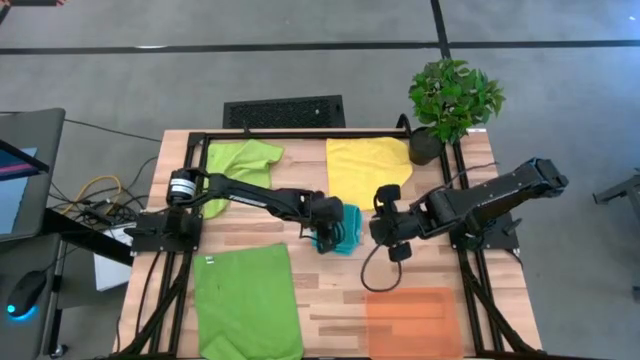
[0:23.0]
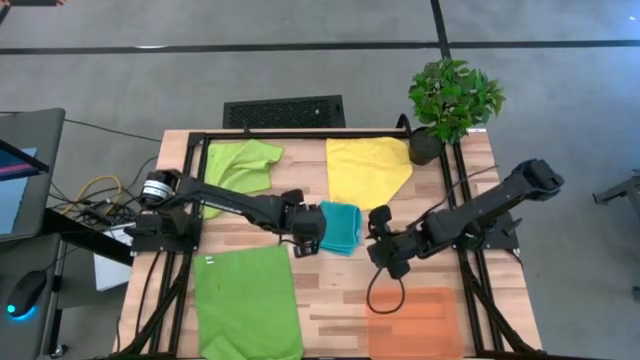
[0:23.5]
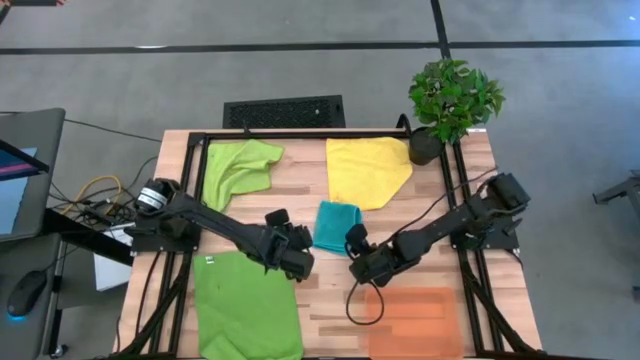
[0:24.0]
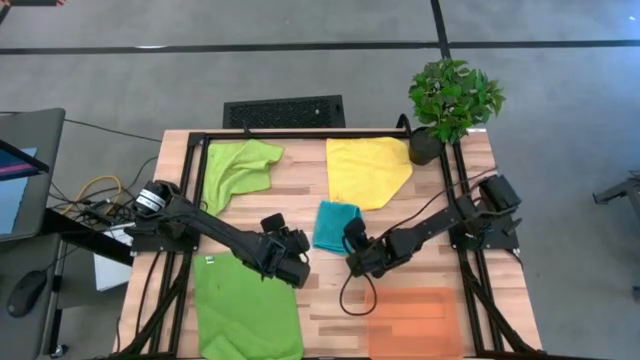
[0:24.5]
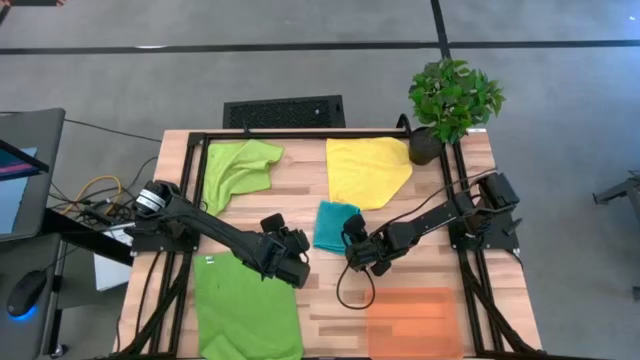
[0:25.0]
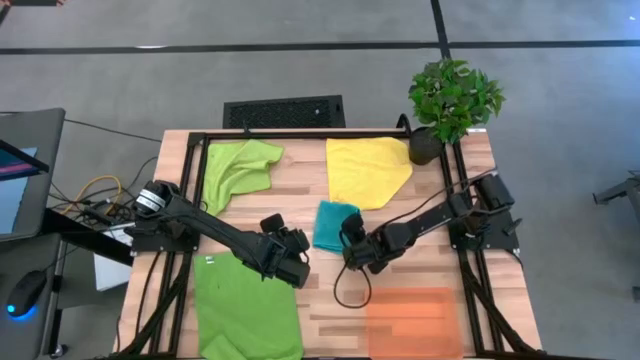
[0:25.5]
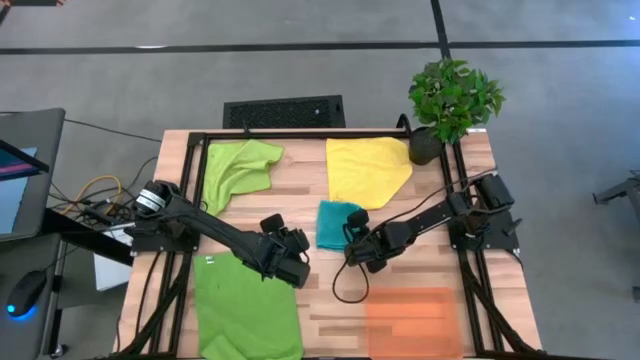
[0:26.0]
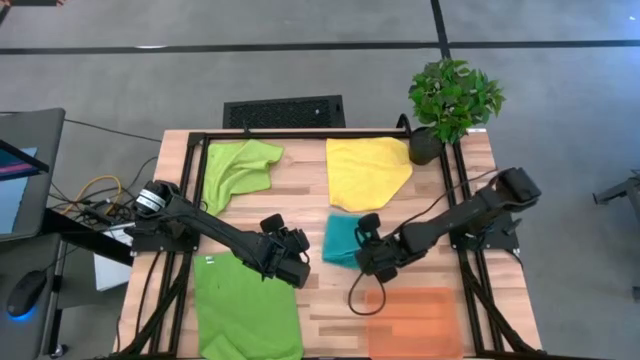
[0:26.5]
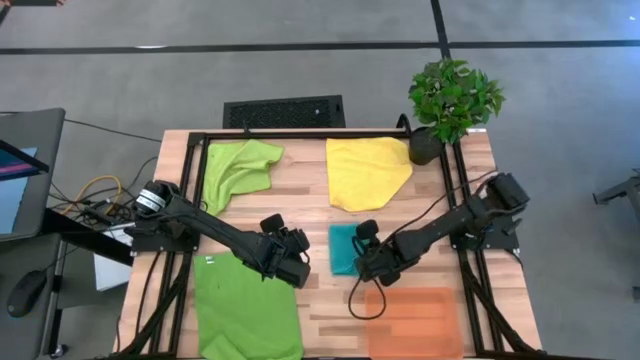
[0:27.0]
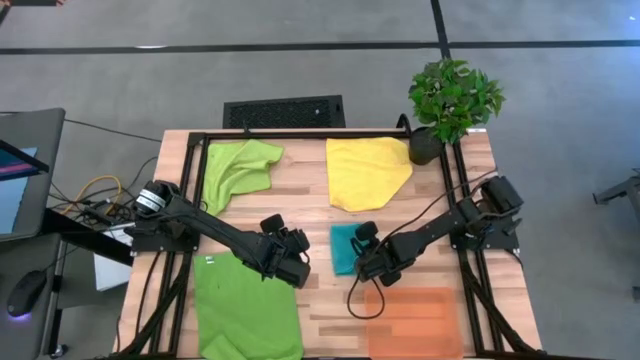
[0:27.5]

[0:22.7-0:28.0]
Task: Fold microfiber towels
Put the folded blue microfiber towel into the orange bin

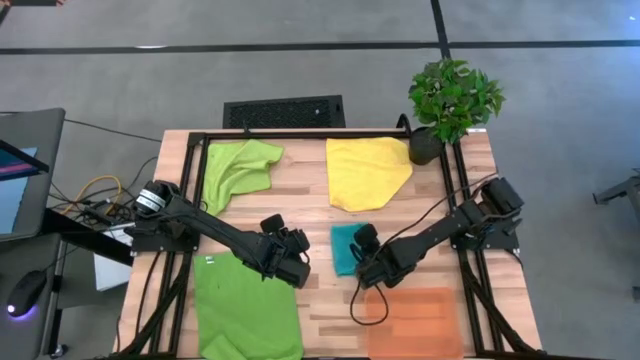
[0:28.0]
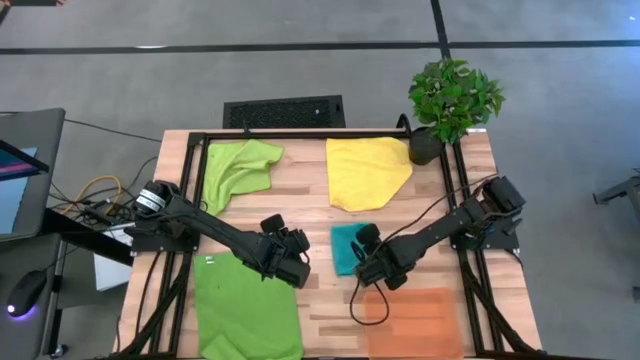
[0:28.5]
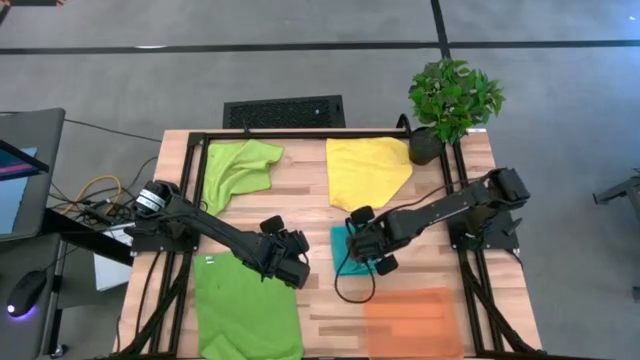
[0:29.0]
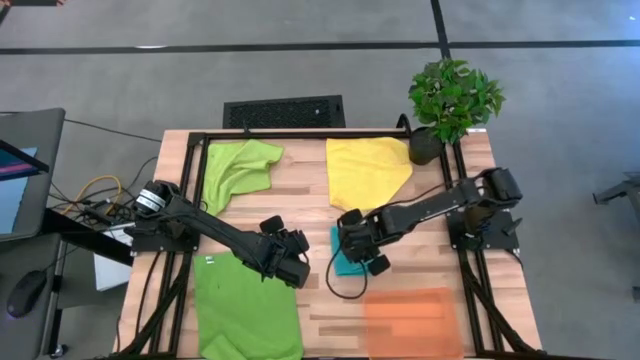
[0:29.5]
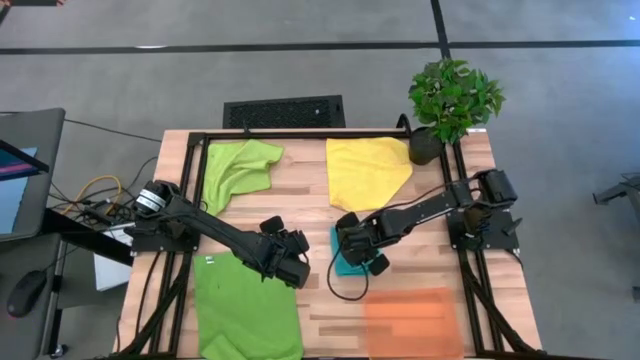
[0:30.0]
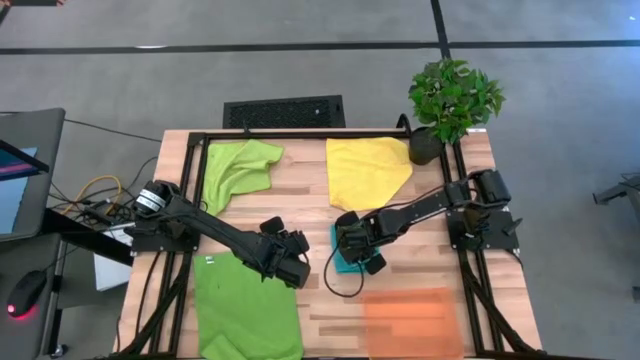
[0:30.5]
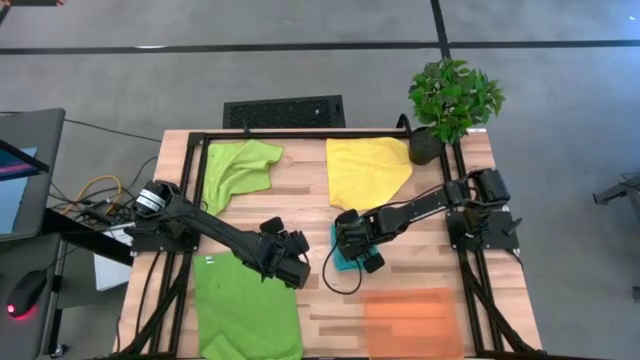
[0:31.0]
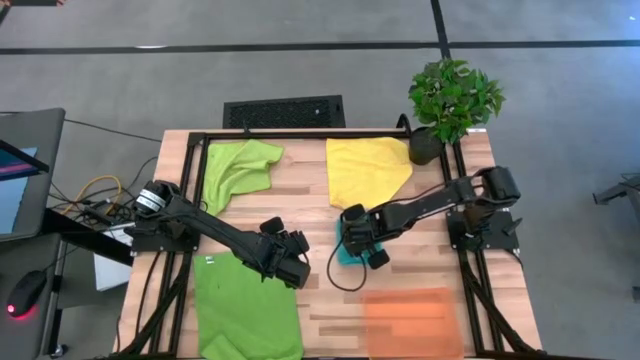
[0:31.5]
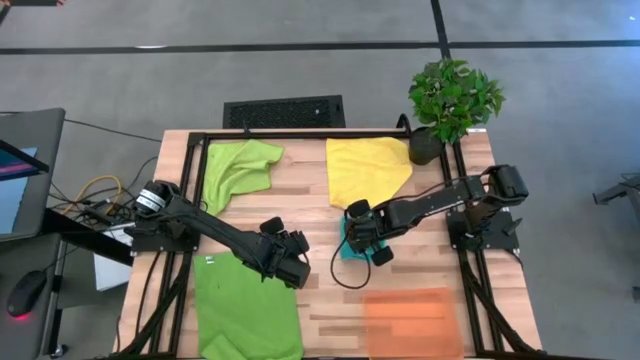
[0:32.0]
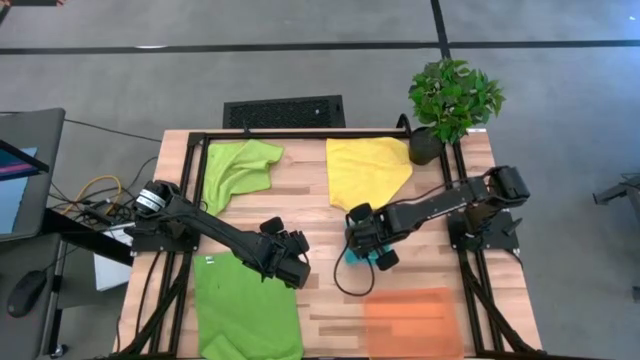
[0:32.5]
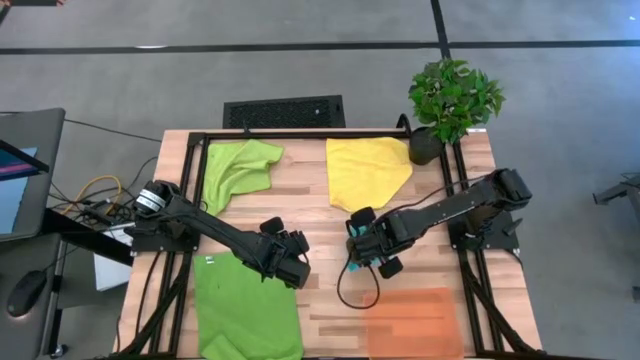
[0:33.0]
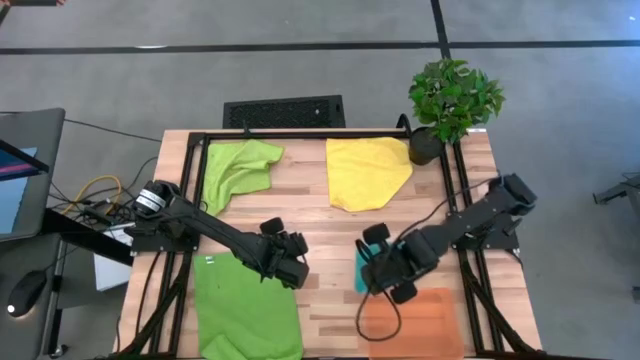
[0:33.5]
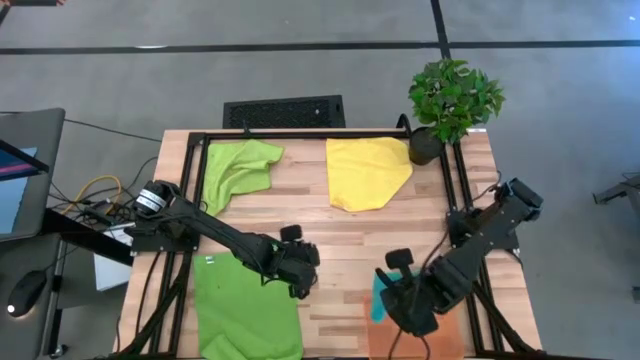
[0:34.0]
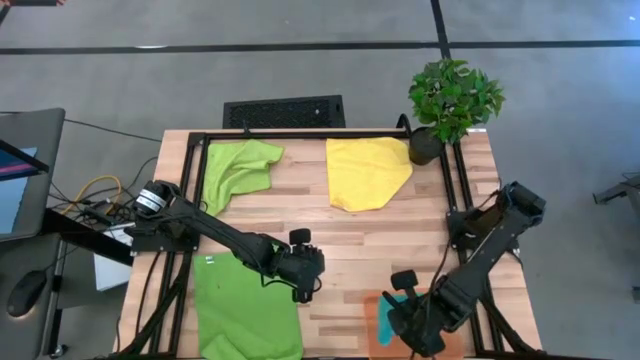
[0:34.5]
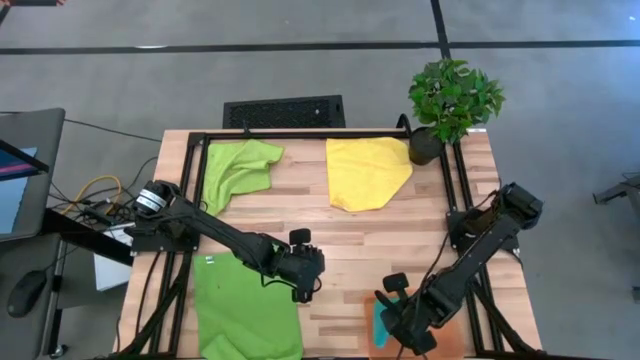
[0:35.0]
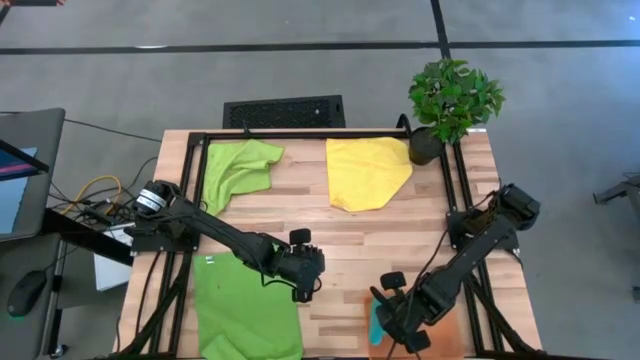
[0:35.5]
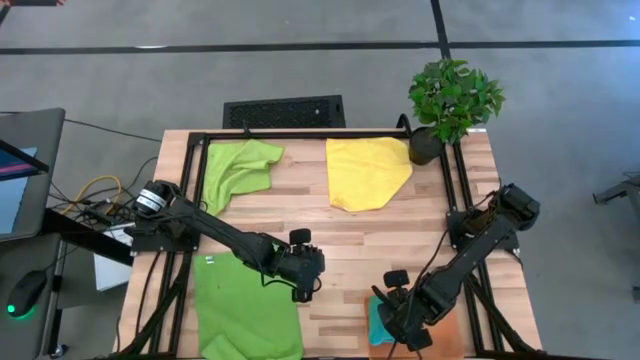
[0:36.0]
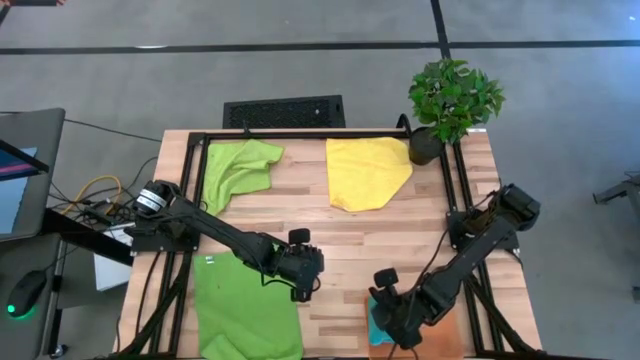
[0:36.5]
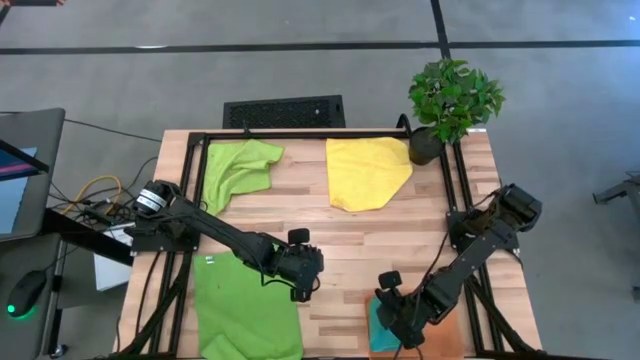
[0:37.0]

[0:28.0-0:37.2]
Put the folded blue microfiber towel into the orange bin

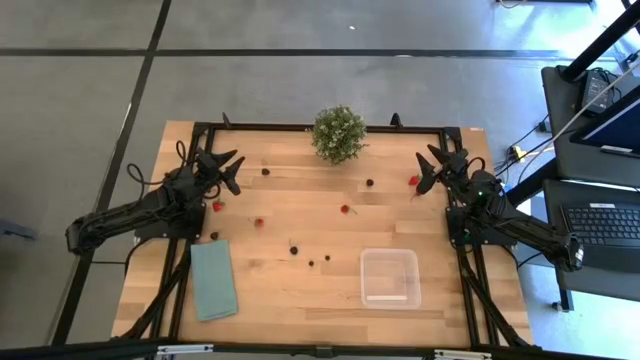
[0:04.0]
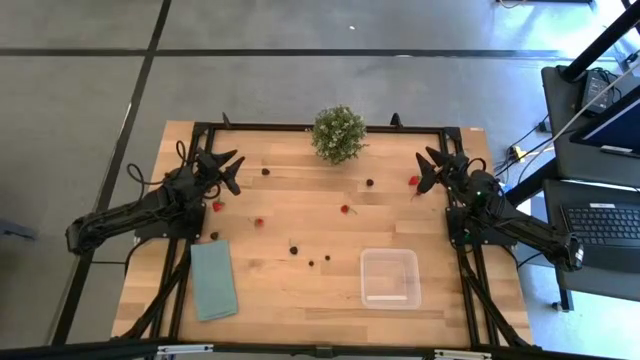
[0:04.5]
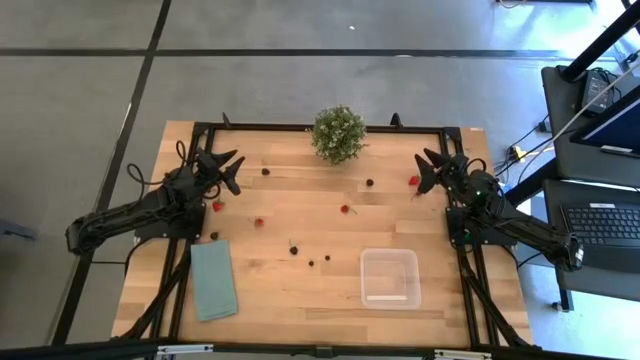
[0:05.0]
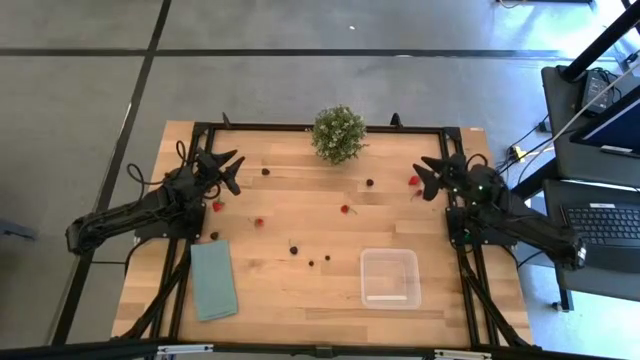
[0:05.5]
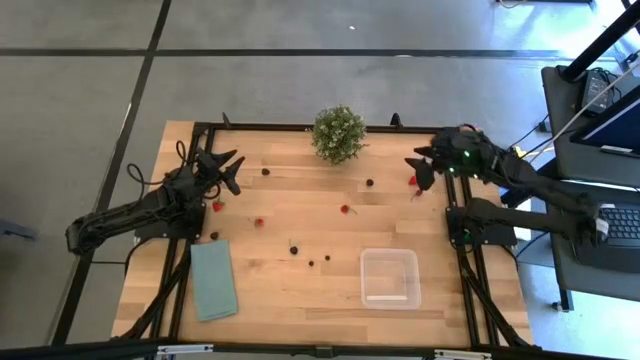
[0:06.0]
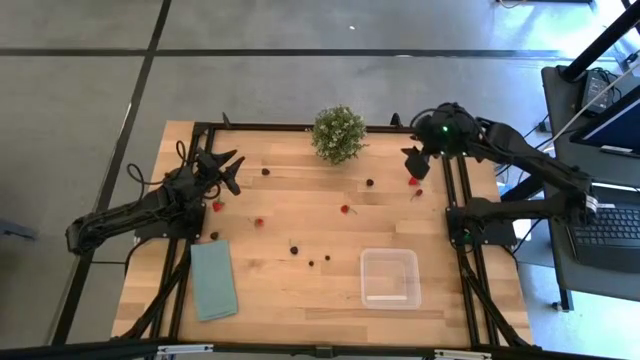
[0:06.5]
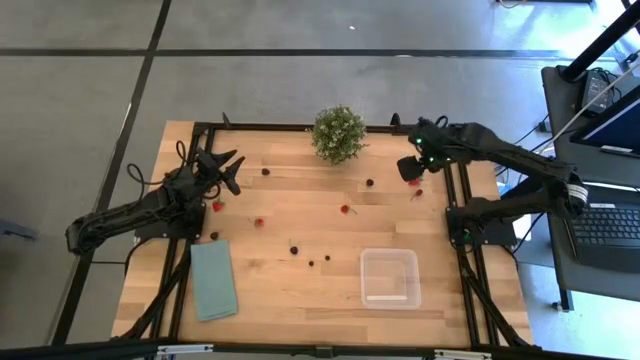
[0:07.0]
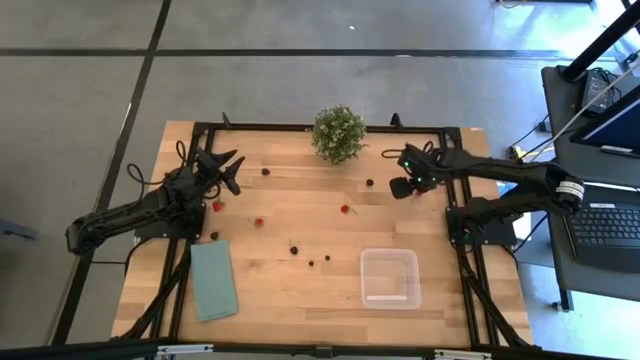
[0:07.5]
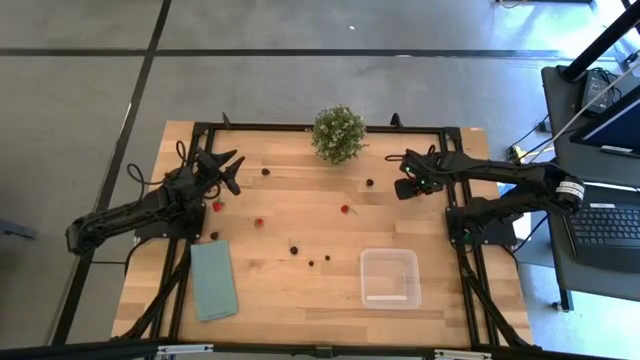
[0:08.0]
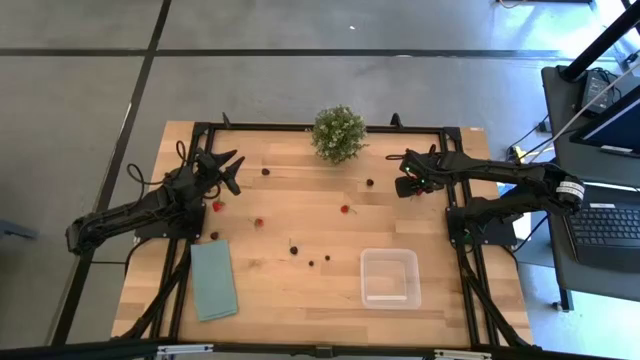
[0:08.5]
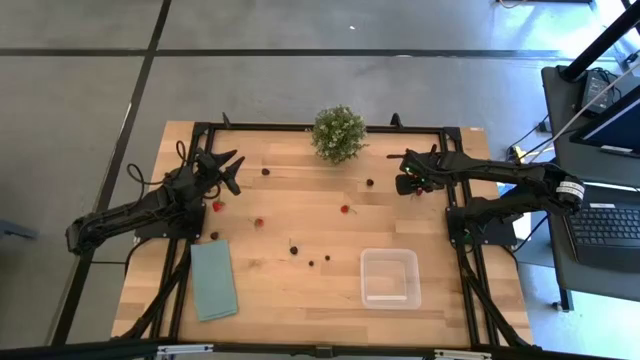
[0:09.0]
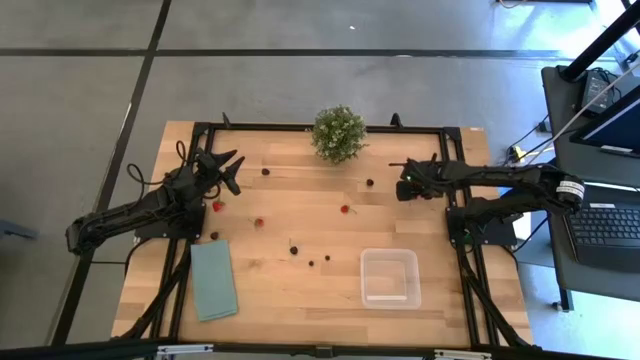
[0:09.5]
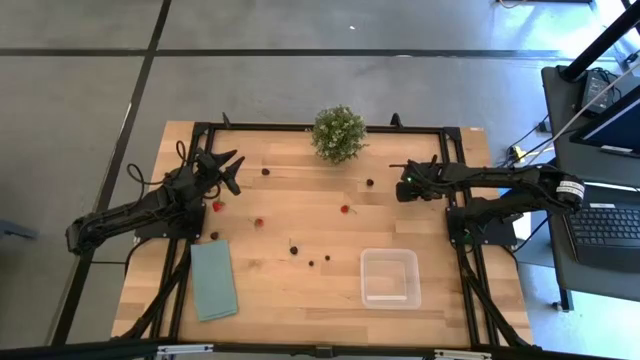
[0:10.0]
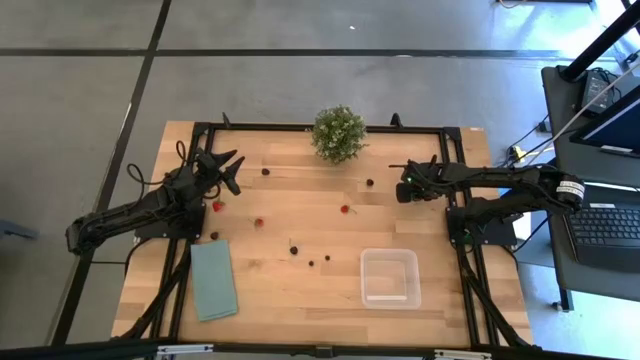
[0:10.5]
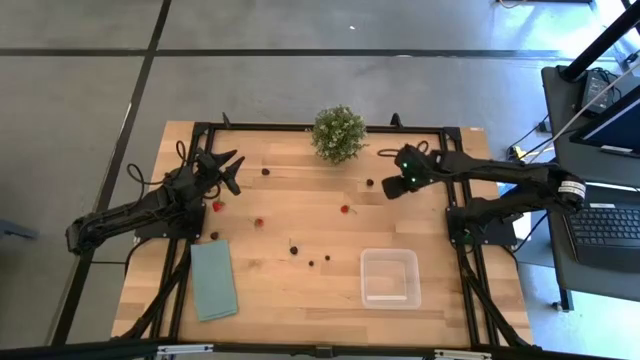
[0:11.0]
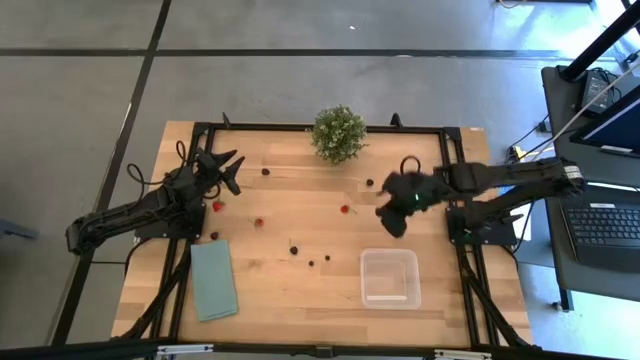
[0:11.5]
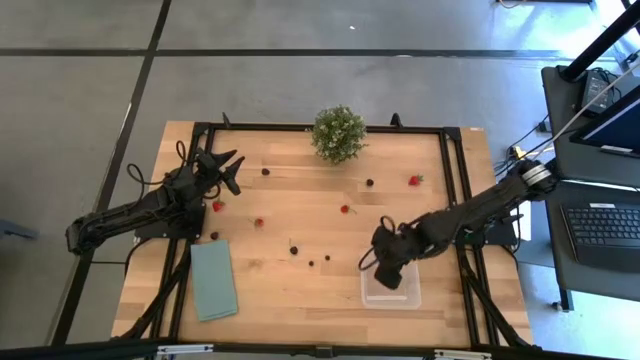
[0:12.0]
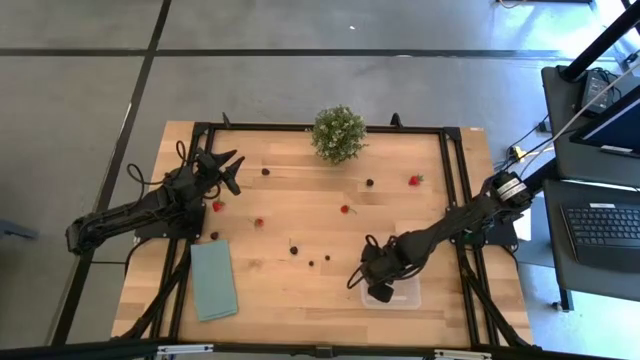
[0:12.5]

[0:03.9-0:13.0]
Task: Pick and placing Produce into tupperware
Put the red cherry into the bin
